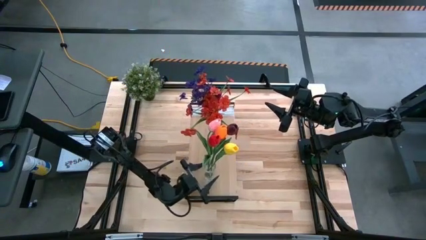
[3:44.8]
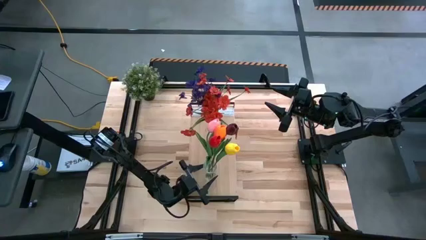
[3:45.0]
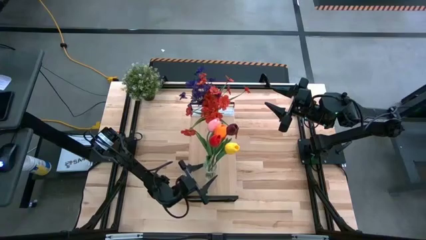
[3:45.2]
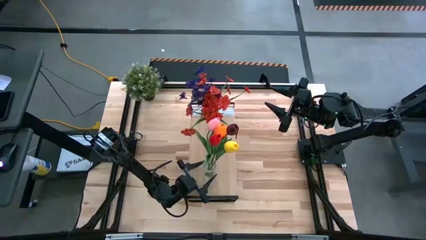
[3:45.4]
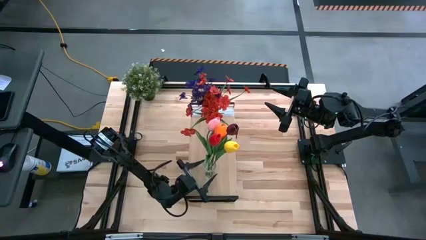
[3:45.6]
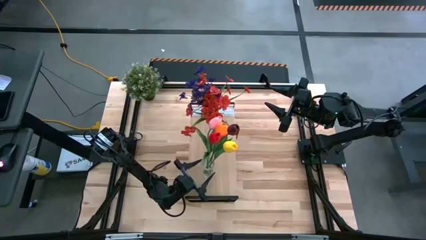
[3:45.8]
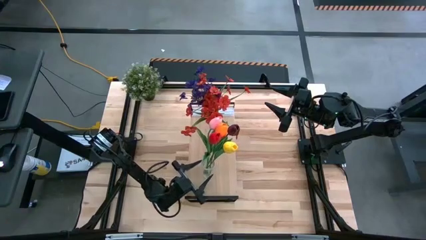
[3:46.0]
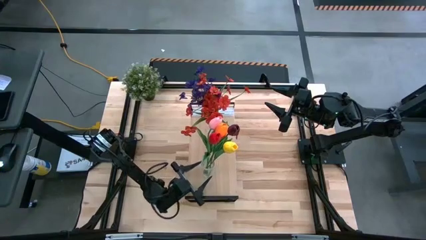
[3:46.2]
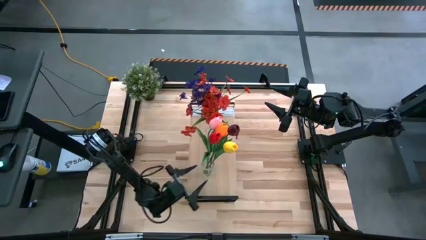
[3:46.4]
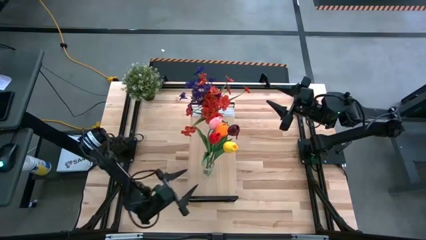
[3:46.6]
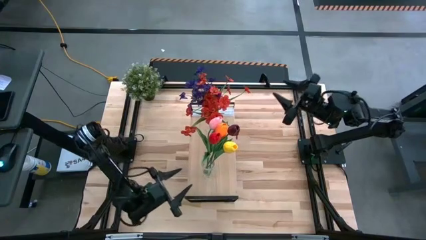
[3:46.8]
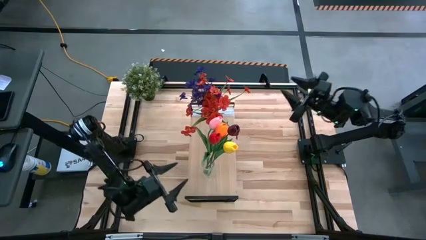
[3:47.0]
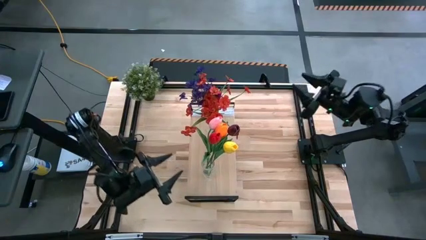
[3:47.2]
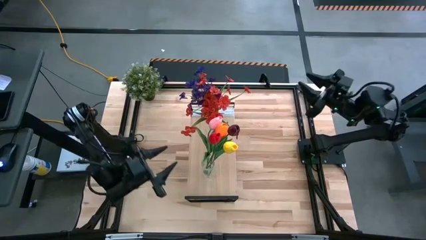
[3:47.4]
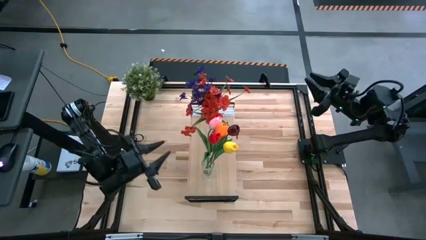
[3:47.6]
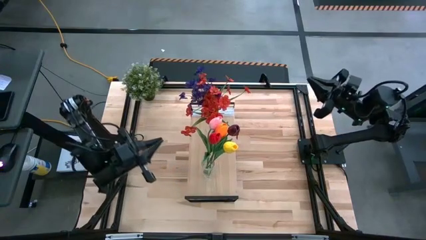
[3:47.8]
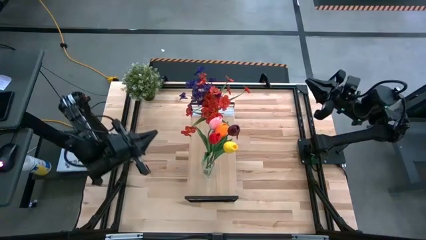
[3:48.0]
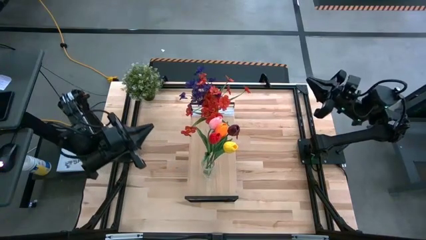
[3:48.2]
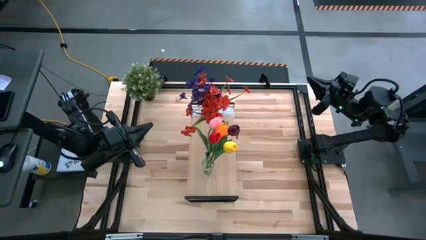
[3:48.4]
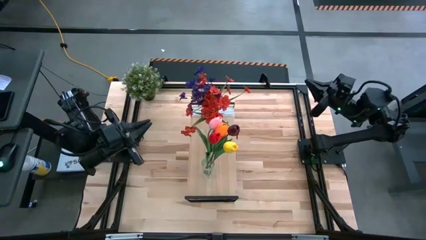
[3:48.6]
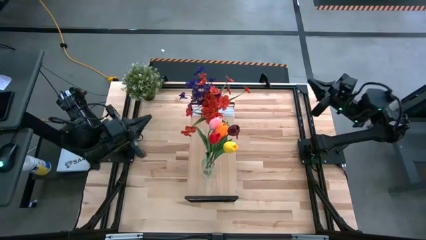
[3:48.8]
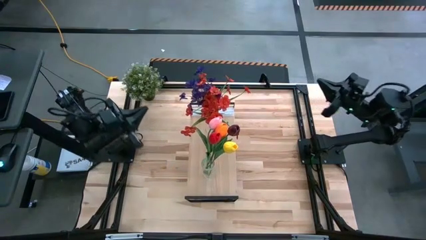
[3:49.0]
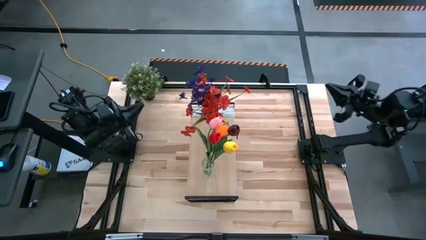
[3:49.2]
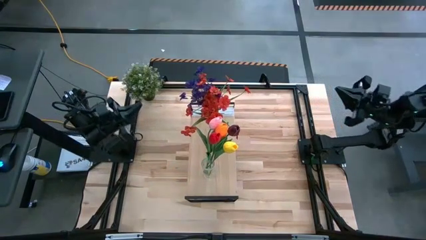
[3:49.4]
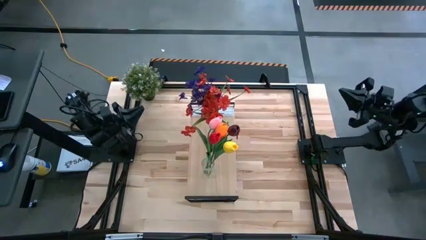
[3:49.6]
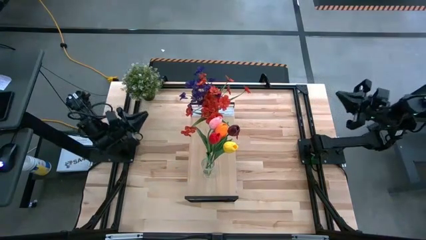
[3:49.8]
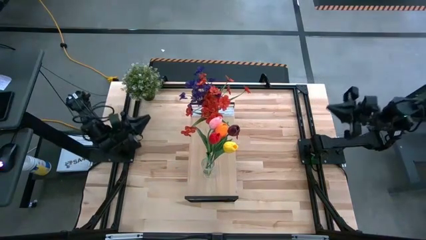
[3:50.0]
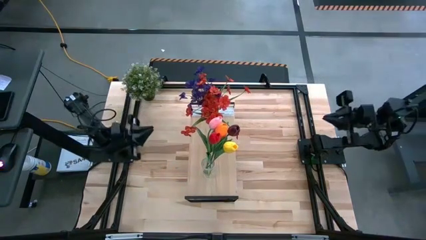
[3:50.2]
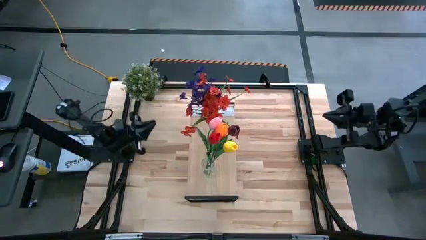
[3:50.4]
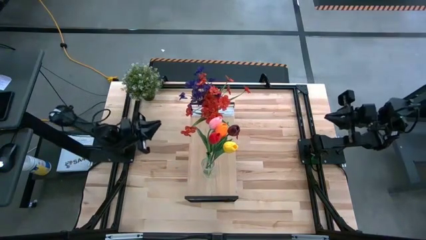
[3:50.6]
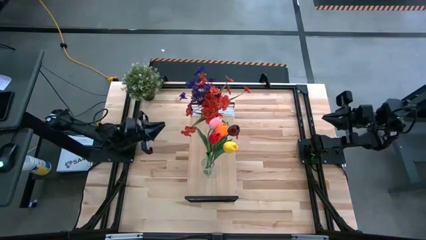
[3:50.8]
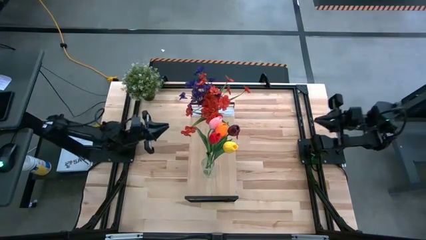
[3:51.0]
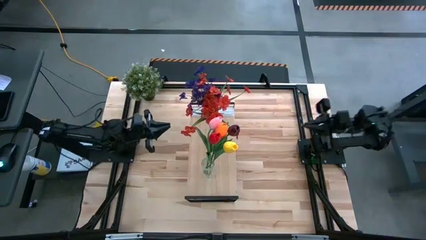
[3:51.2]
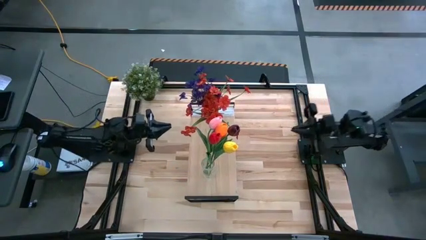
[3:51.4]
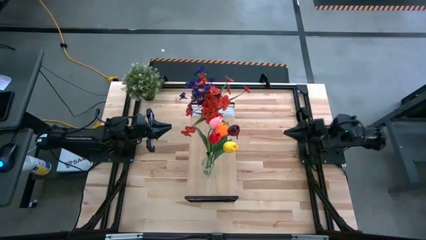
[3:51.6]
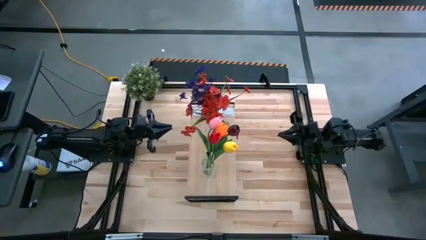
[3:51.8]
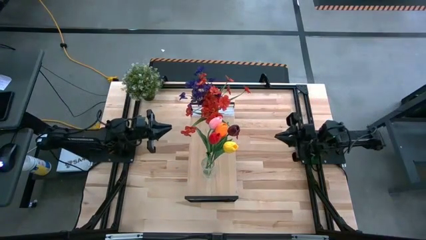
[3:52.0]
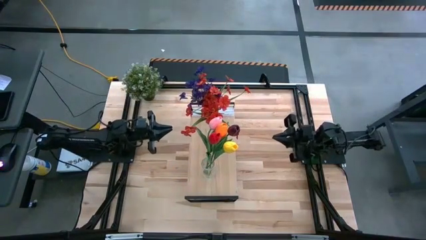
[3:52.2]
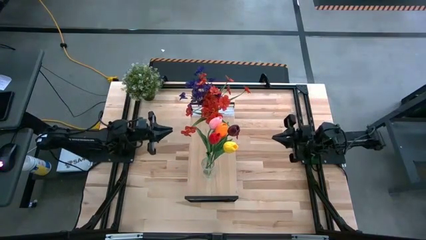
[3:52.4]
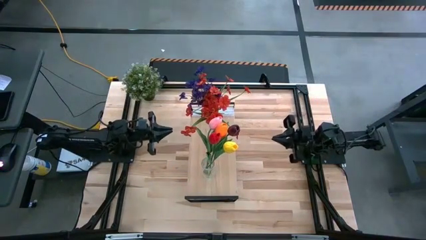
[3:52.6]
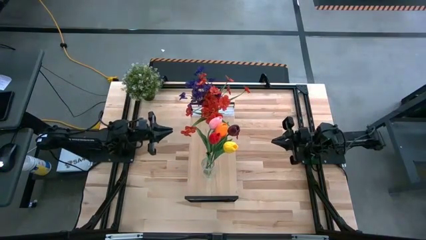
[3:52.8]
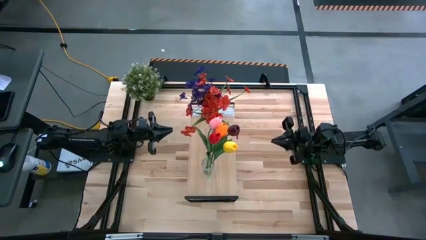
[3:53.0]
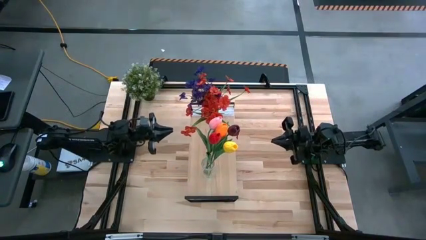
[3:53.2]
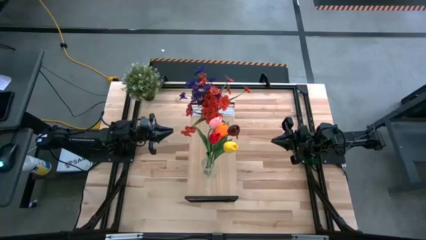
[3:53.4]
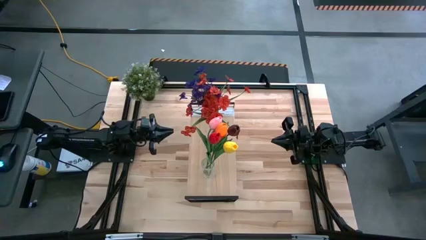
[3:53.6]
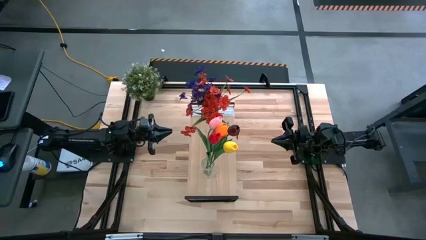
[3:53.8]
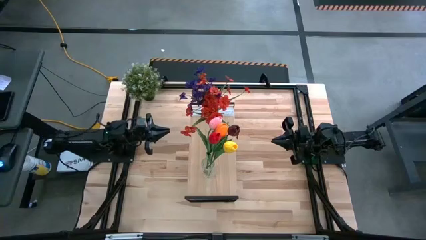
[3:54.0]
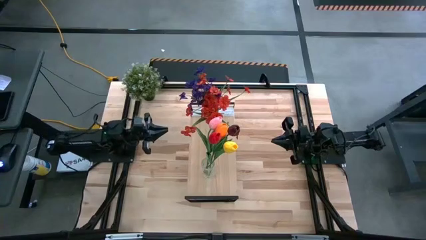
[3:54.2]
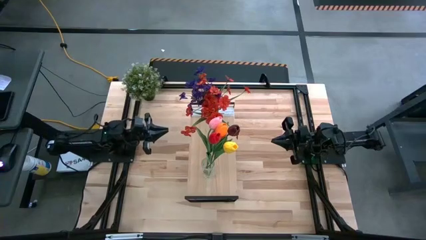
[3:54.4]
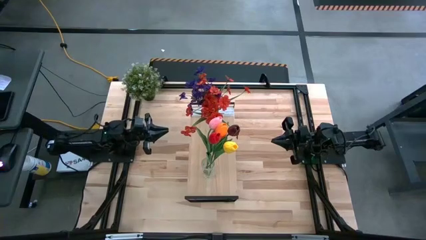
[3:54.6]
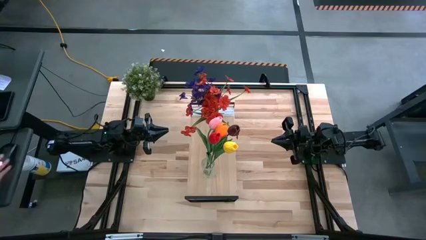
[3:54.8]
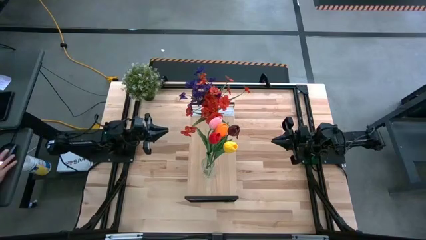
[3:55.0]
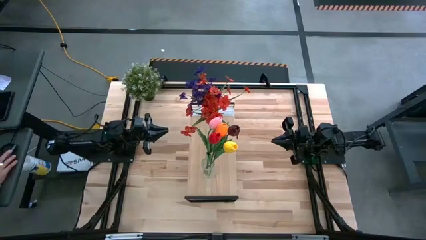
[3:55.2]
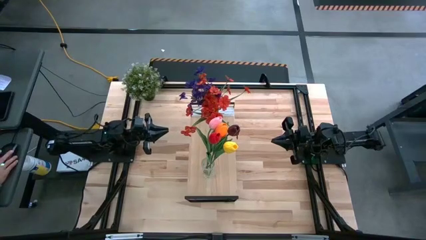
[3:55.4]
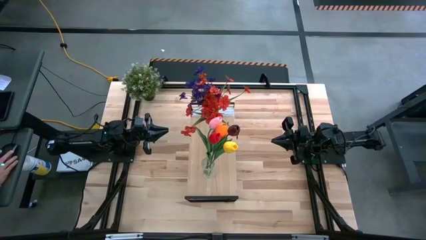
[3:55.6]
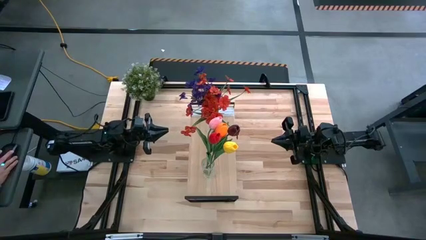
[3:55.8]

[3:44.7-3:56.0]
Task: Pick and place flowers into a vace then onto a shelf
Return to Home Position

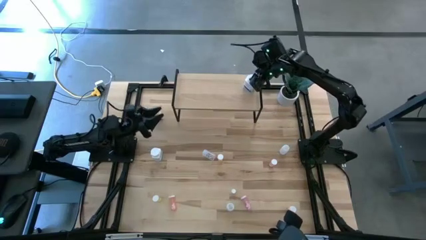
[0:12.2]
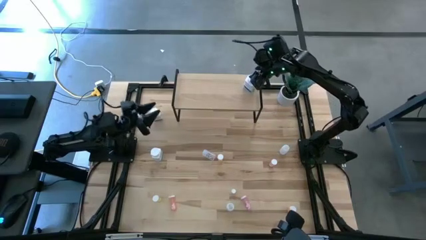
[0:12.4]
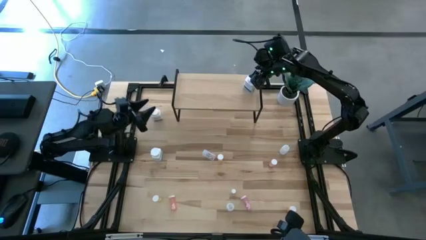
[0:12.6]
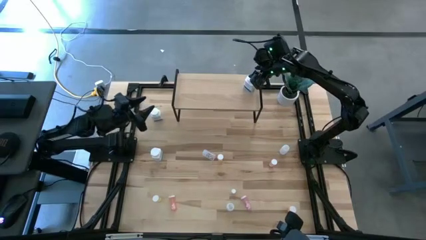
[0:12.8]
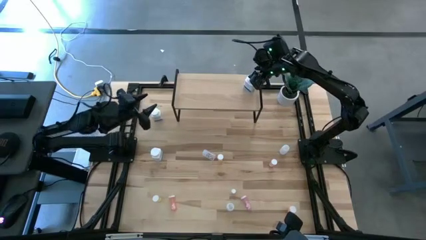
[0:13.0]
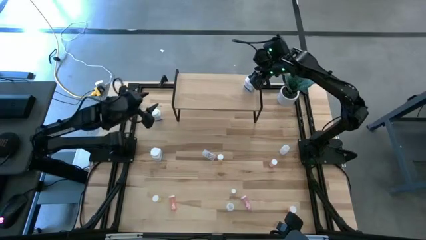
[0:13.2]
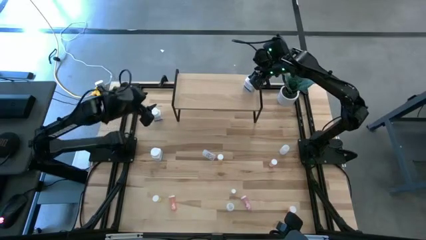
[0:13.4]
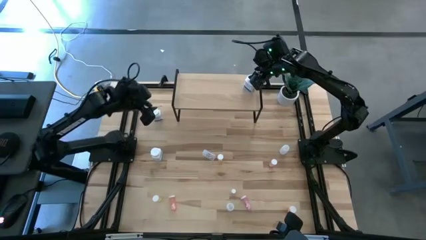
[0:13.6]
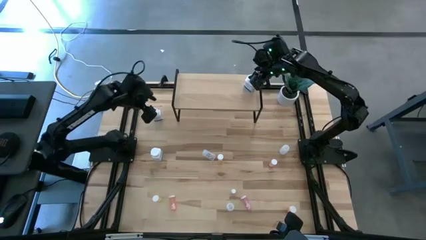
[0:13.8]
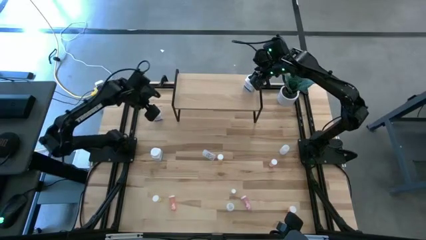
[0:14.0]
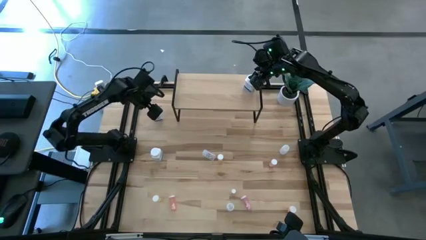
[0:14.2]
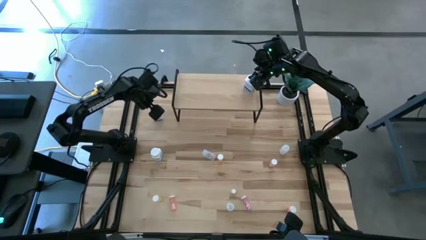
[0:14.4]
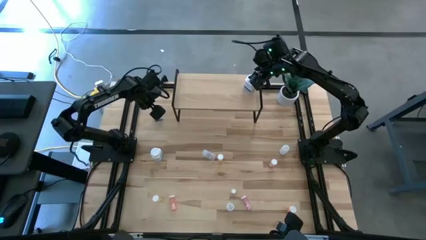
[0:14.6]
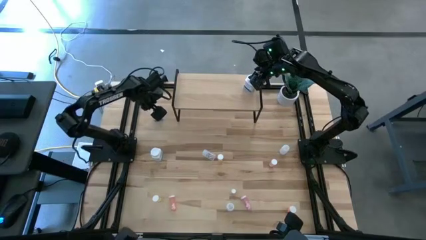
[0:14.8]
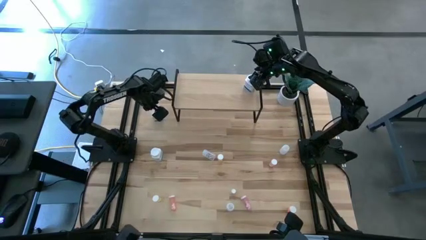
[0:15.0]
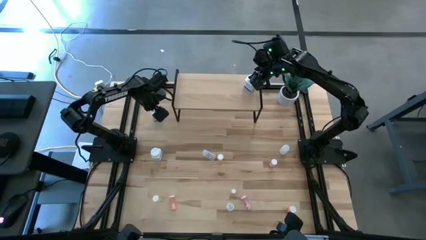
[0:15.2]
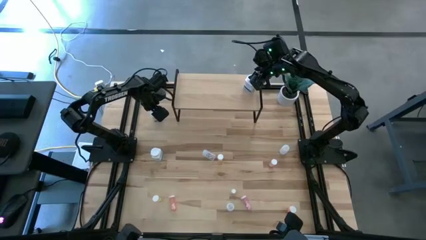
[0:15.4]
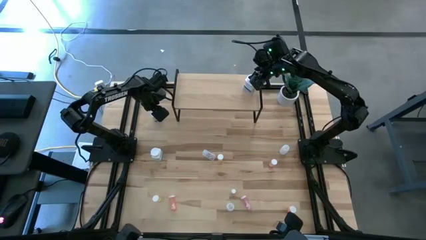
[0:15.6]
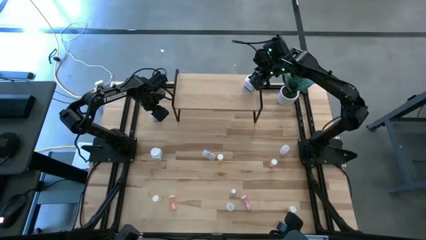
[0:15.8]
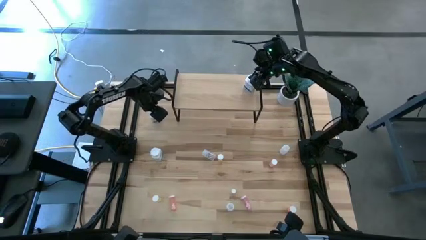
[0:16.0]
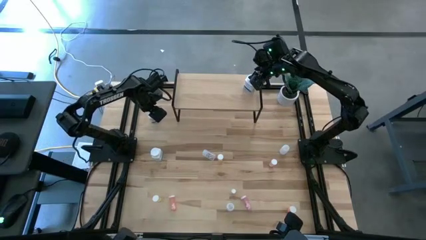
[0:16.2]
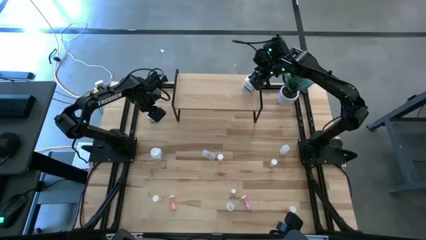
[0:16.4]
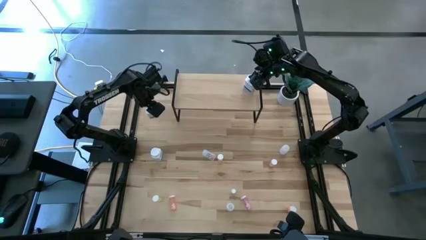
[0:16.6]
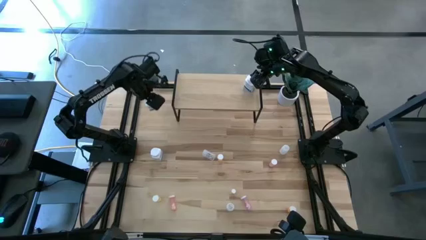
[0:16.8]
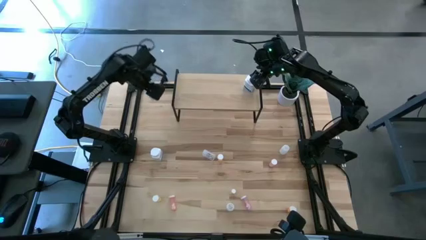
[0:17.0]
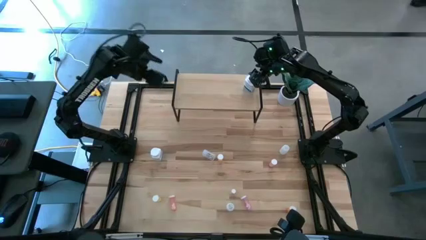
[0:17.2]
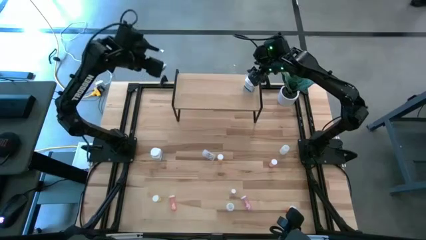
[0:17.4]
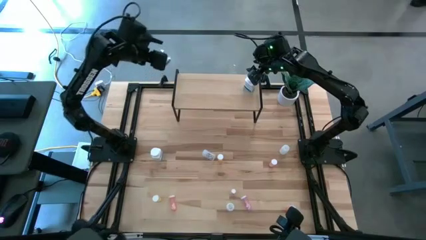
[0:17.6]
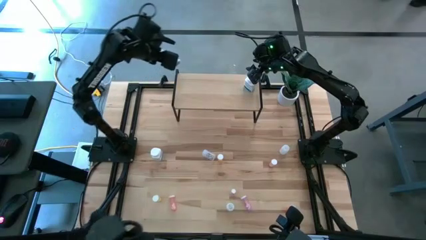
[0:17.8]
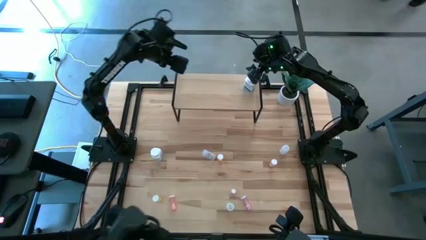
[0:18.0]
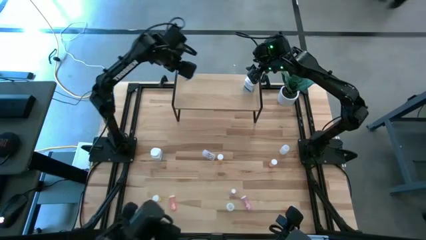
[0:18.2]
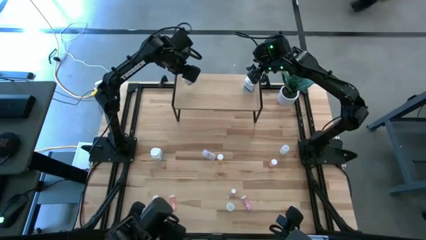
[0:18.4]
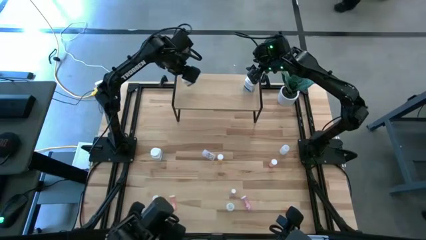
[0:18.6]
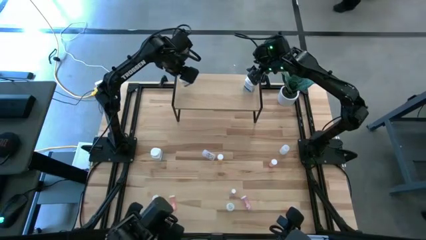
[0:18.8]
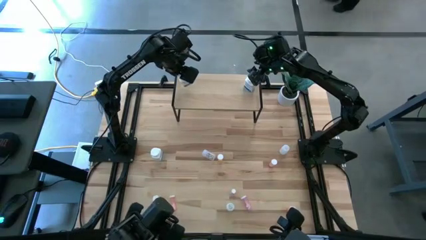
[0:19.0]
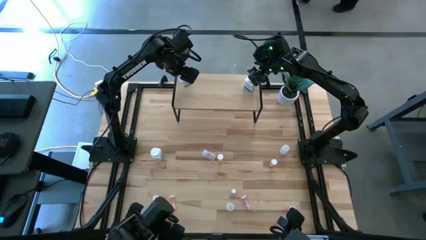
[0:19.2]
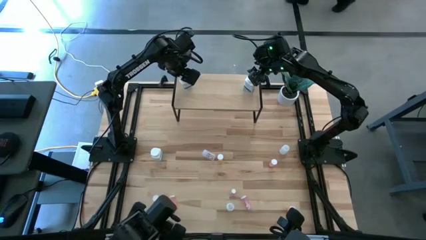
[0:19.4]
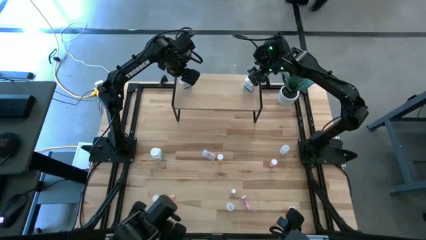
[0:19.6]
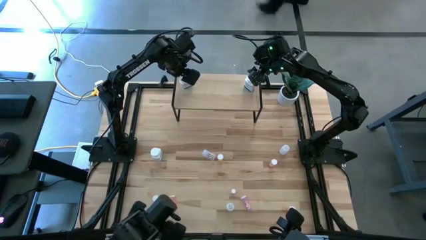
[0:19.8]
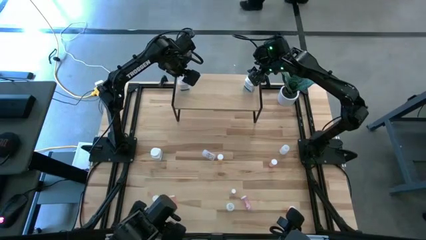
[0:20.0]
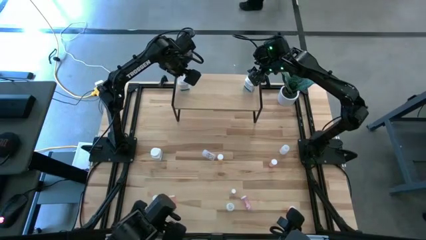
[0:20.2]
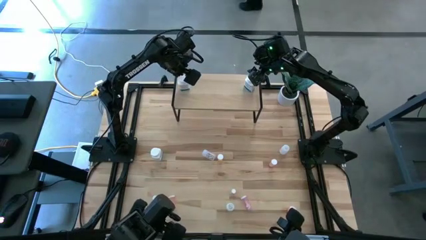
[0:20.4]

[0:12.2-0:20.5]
Task: Pick and place medicine bottles onto shelf by color
Put the top white and blue pill bottle on the shelf
